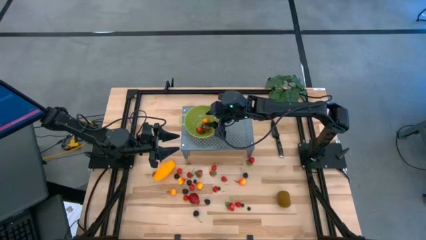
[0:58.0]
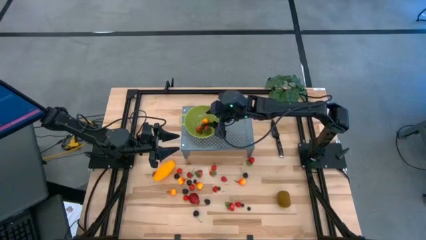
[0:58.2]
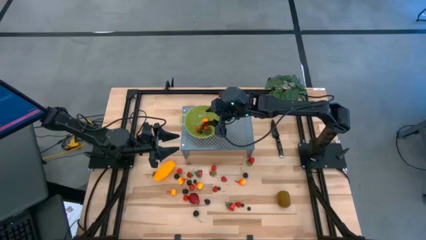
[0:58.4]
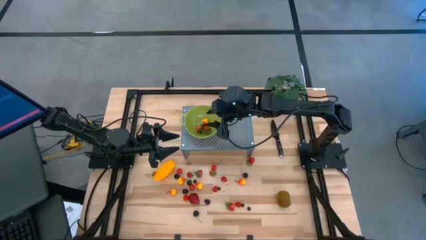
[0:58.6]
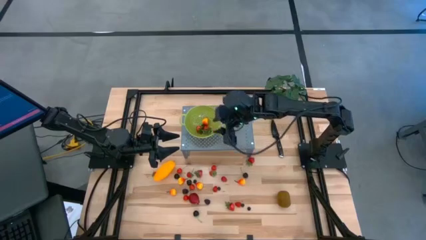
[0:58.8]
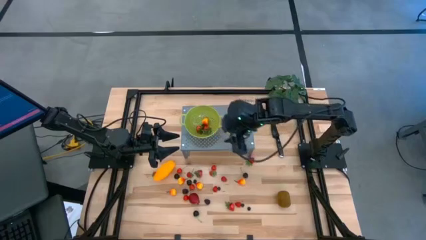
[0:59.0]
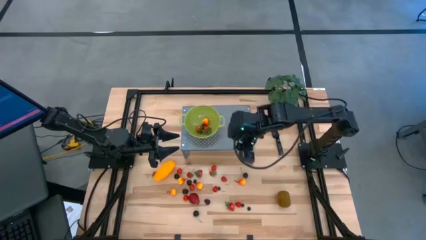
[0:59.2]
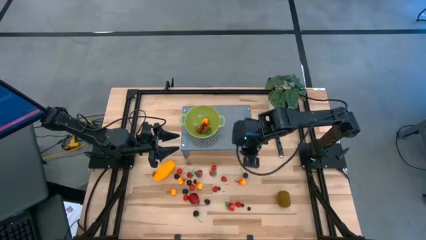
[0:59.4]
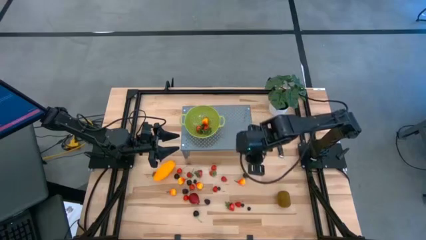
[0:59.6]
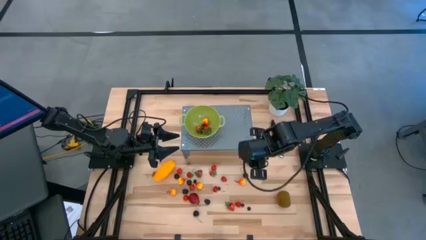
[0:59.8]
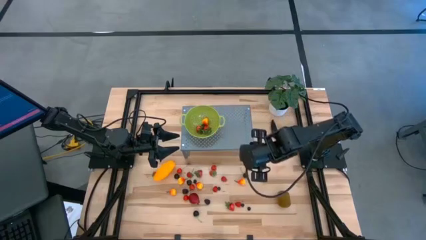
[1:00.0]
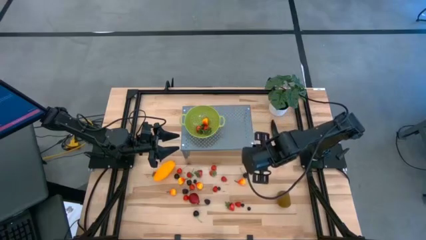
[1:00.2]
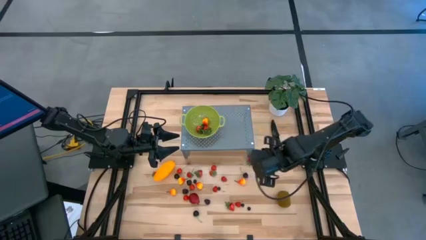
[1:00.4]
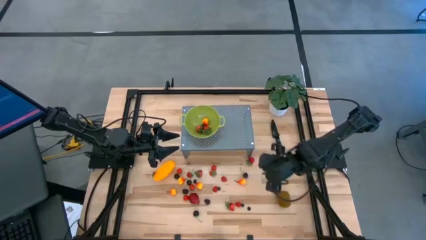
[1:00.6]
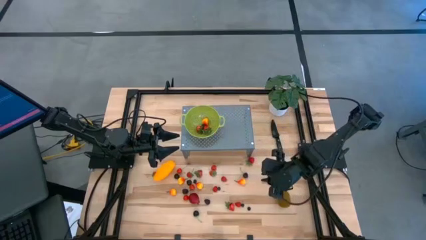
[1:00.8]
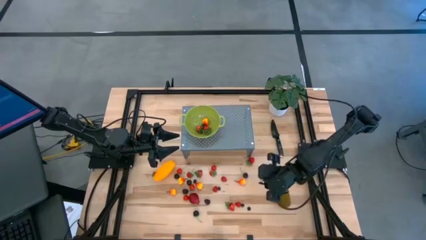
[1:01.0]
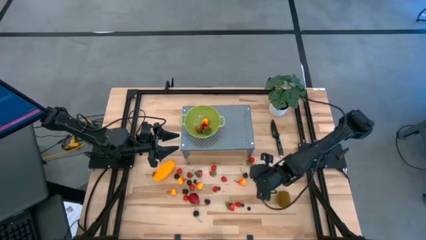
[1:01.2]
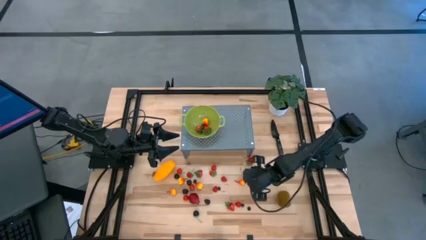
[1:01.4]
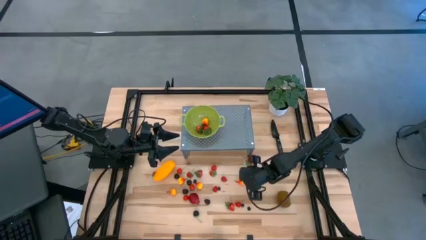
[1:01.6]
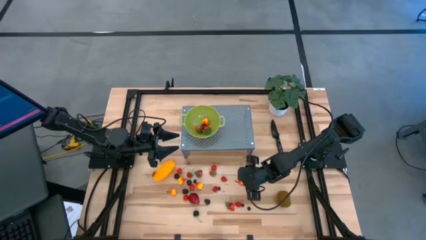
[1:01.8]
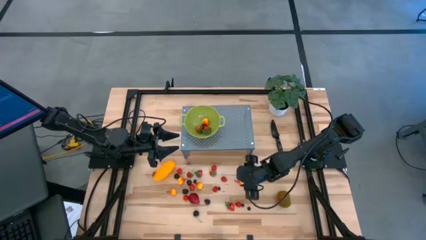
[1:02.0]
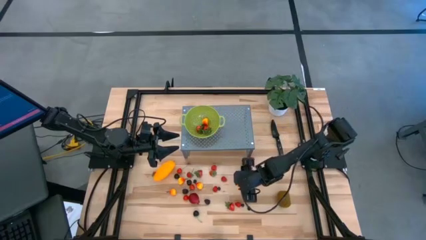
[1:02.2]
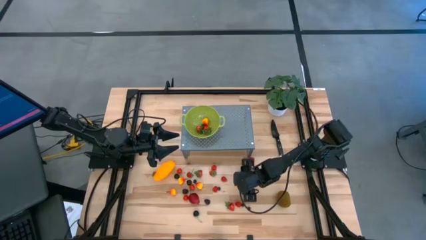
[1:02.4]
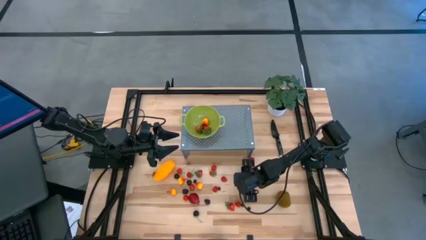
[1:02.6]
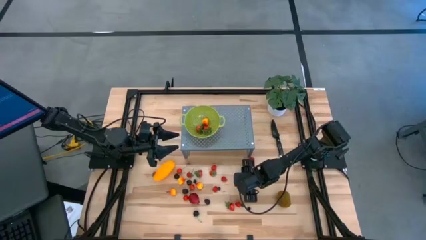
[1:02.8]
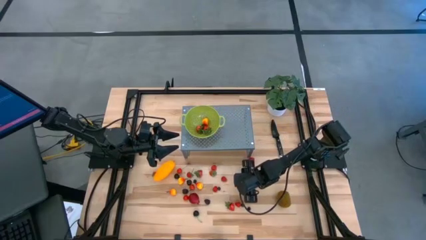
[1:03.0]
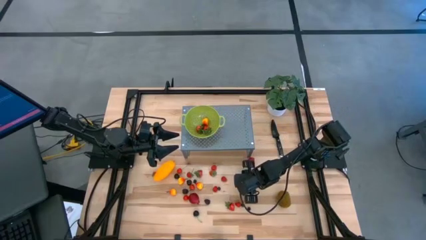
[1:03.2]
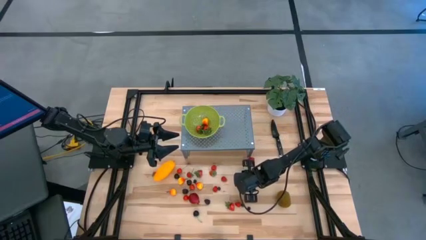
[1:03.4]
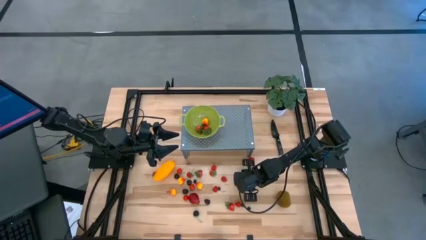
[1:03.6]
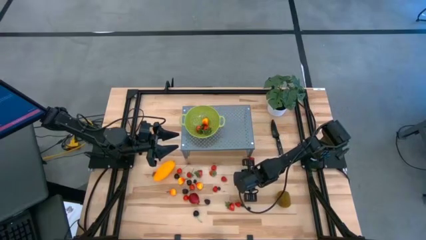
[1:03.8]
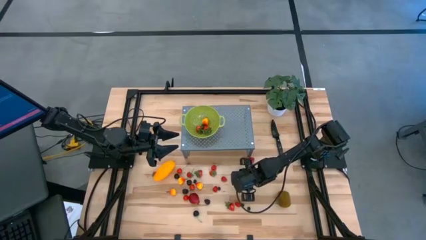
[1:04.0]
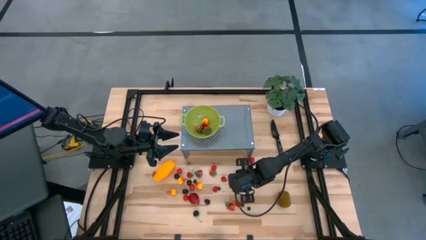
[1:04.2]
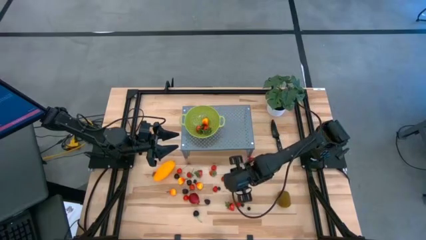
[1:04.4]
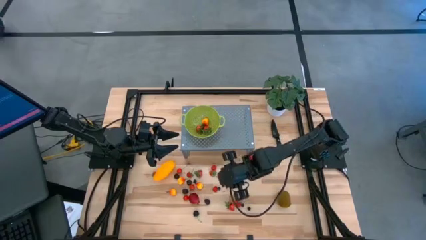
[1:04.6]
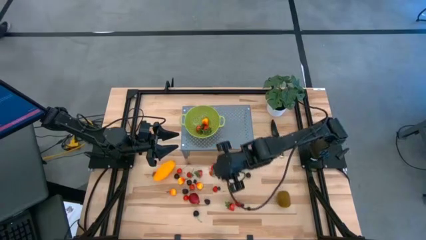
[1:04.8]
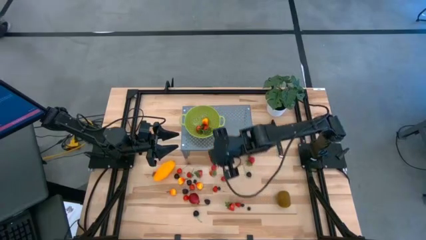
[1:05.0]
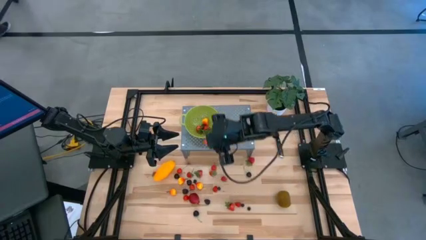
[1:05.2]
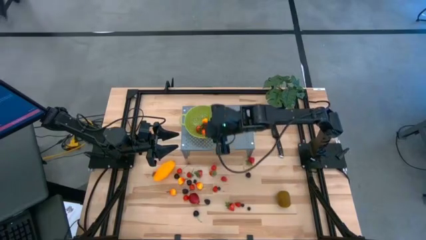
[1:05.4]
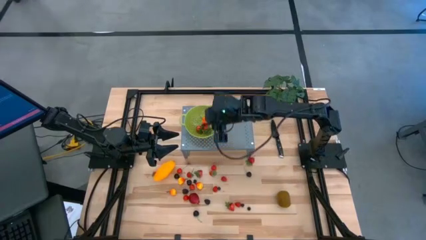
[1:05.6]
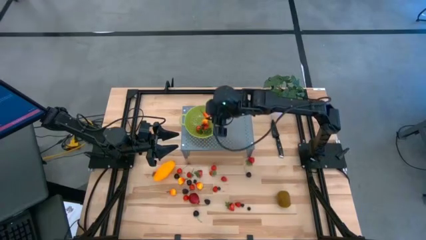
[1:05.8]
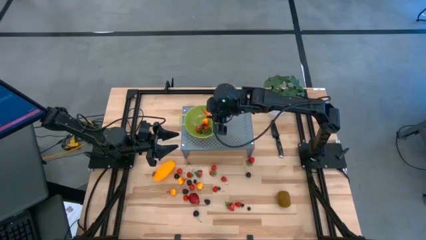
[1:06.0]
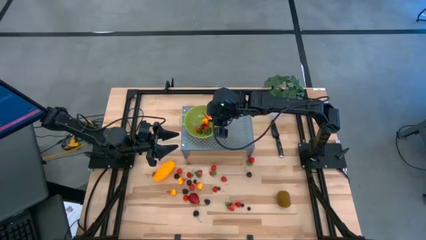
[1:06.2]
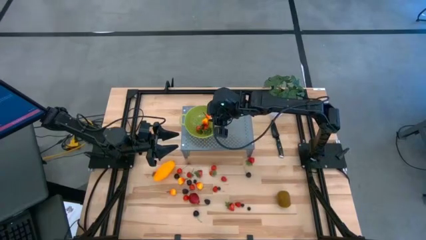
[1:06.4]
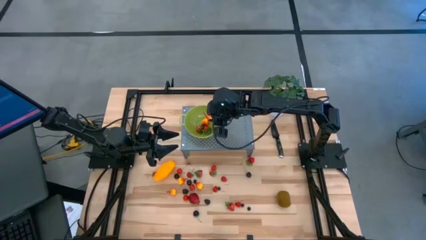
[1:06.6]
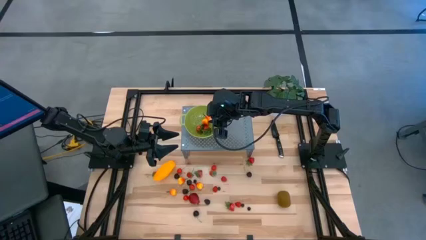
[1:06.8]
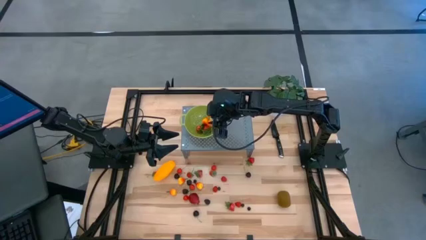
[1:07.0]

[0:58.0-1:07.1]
Task: Pick & Place Fruit
Put the peach into the green strainer bowl on the shelf

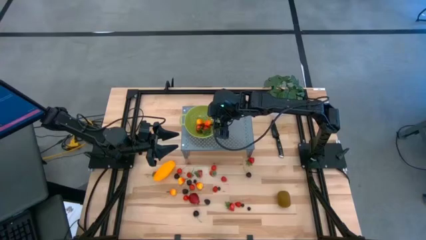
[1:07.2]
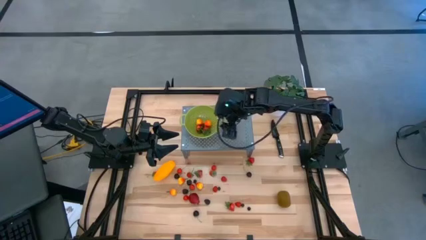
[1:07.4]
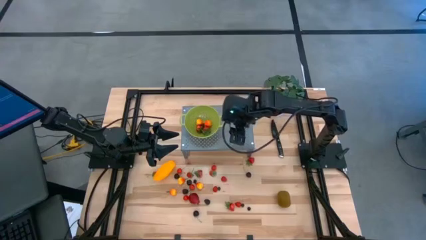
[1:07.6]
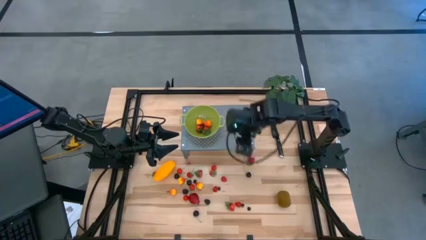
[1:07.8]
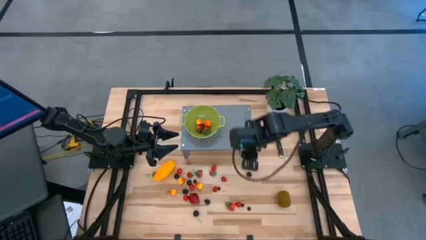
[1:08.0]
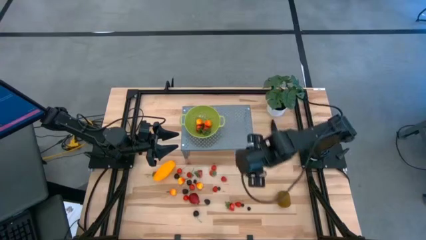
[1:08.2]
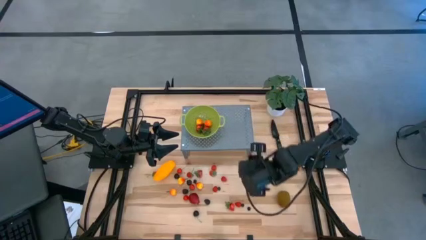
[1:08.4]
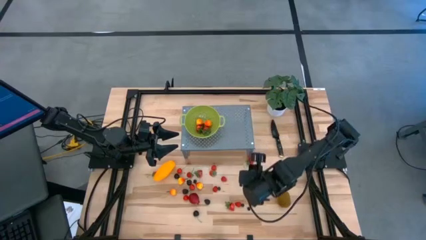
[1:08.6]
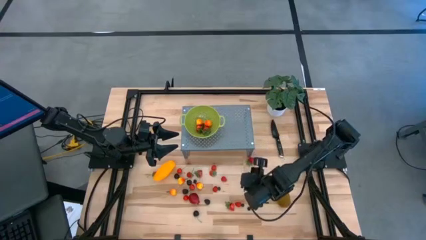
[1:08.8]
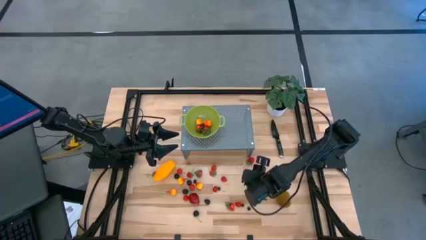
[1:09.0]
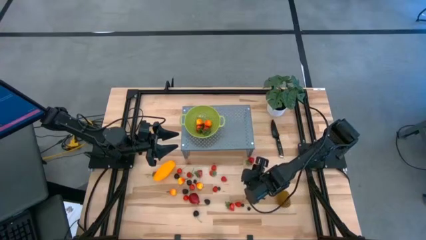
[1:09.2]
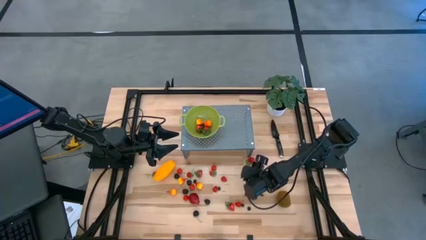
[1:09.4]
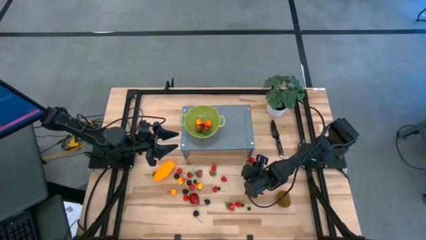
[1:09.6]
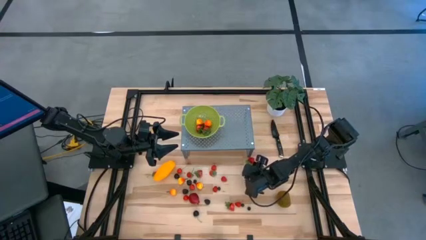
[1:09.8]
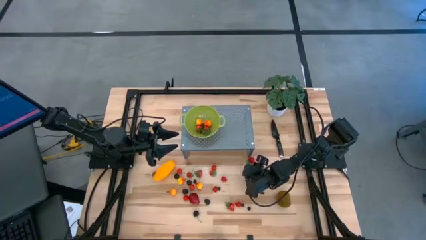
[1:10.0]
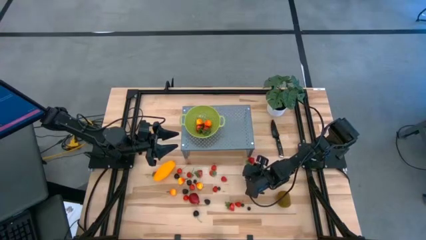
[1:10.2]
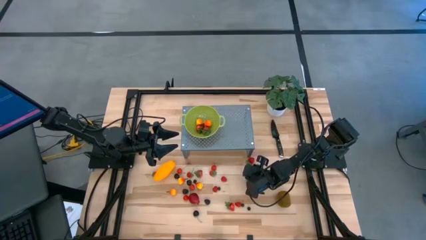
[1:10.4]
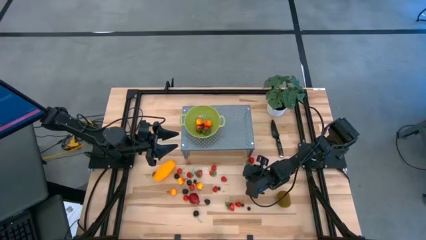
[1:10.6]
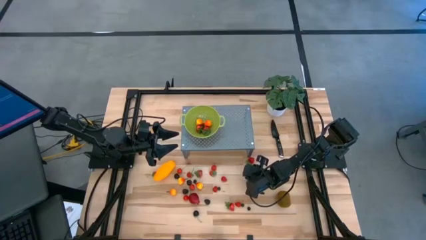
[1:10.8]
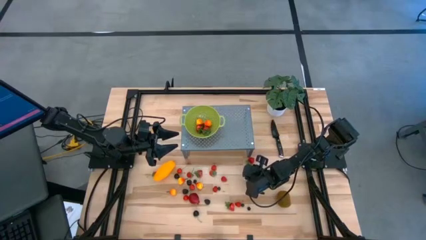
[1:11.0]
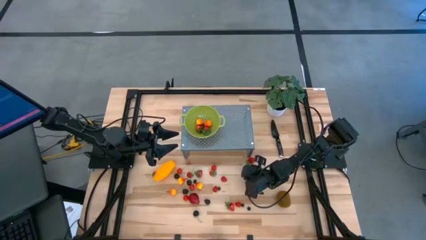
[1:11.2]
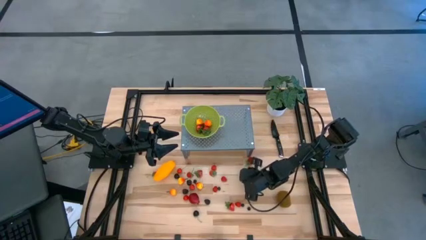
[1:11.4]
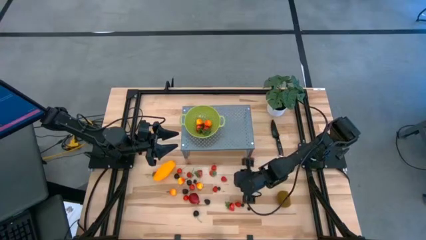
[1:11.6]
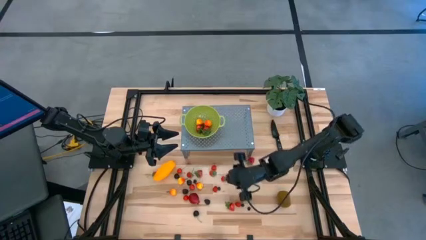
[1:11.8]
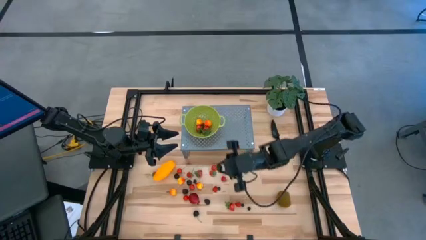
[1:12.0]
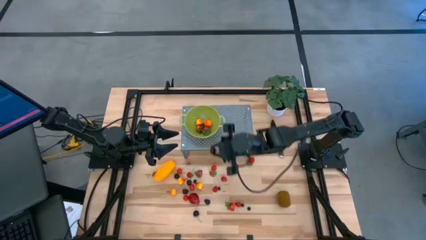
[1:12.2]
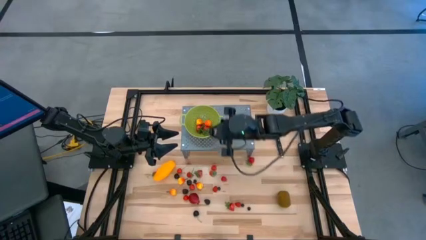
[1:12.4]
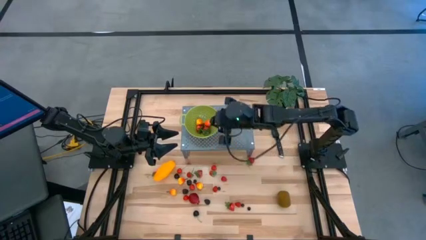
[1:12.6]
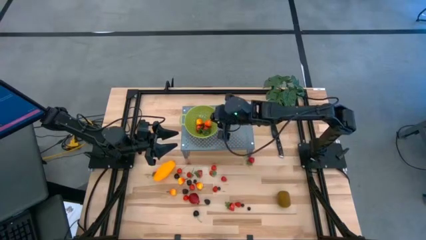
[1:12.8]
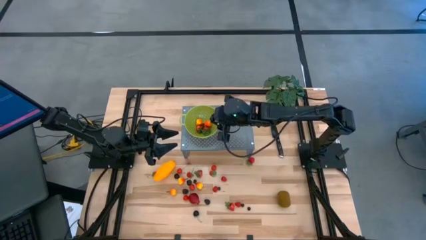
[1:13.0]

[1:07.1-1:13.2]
Put the black cherry into the green strainer bowl on the shelf

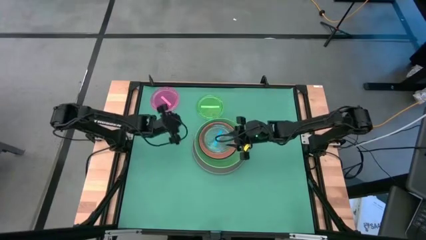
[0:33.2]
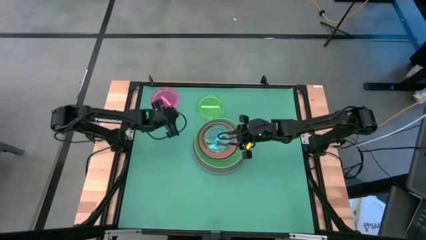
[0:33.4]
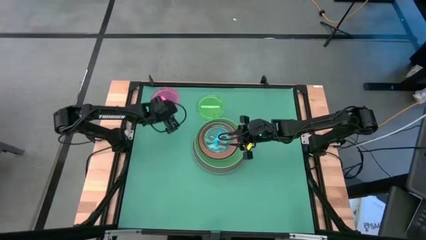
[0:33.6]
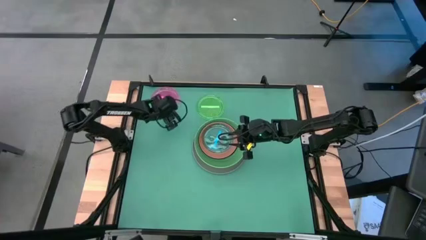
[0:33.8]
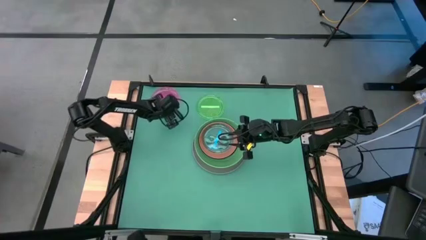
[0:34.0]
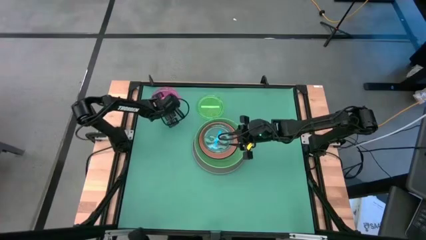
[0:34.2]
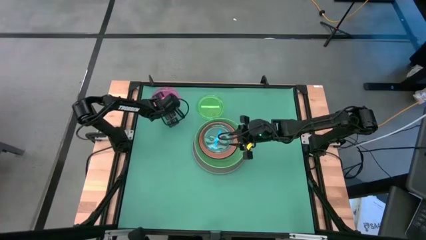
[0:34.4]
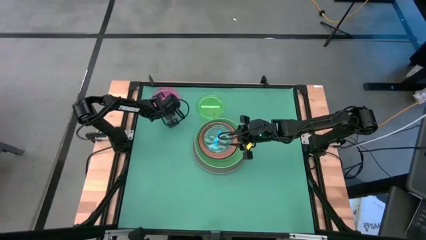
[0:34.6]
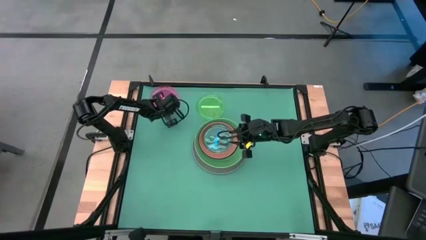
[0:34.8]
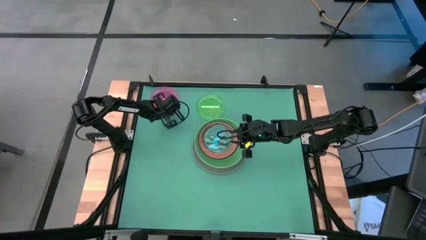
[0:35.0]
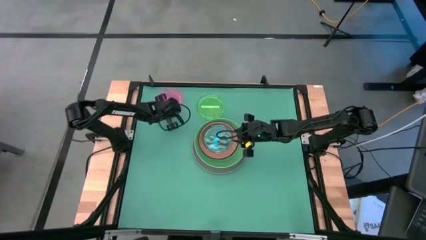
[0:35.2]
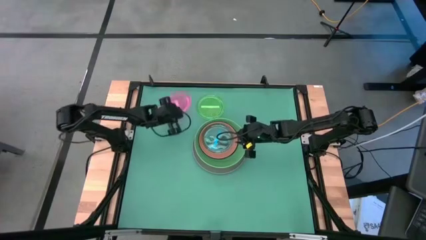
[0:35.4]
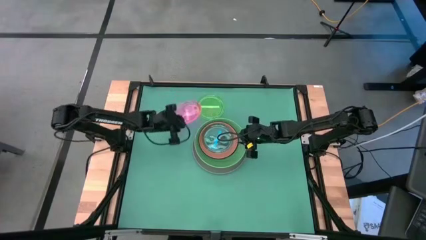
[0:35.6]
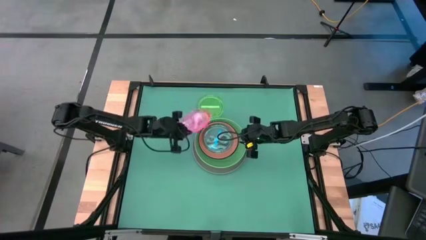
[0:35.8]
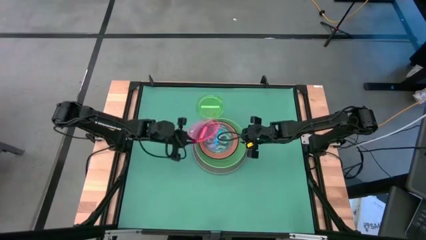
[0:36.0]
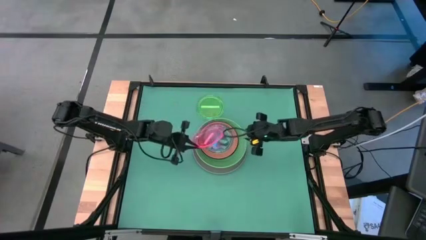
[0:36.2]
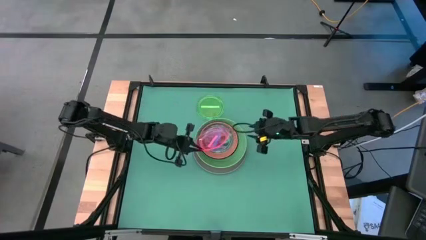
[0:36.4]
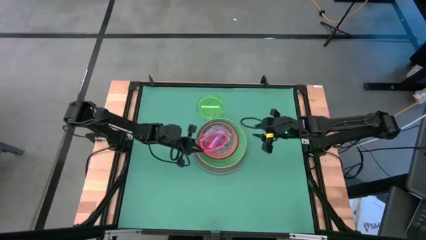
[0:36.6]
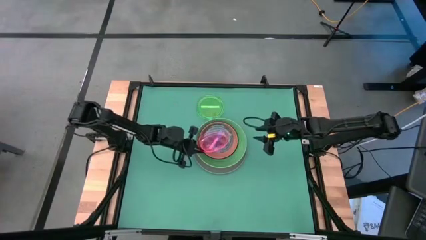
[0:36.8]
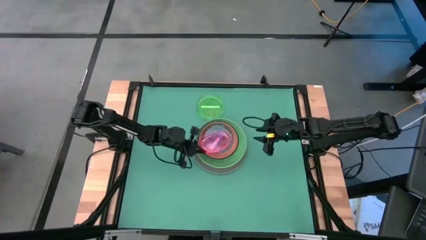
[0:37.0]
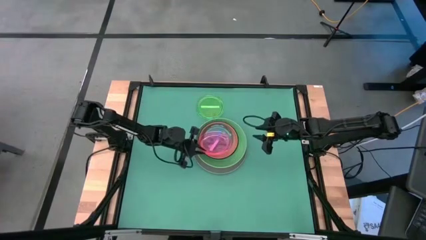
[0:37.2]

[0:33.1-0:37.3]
Task: Stack plastic plates
Stack the pink plate on top of the blue plate
